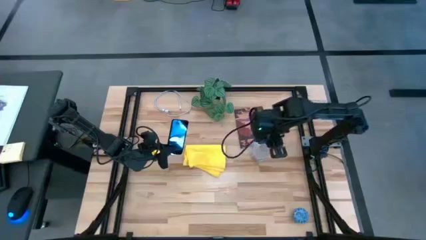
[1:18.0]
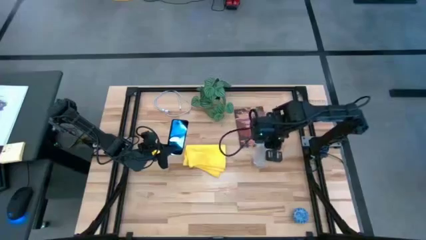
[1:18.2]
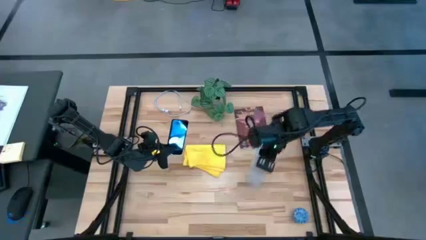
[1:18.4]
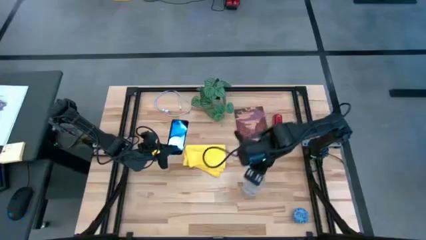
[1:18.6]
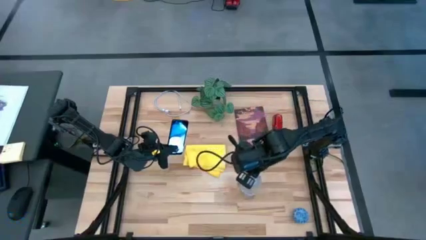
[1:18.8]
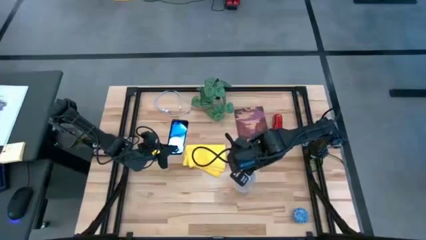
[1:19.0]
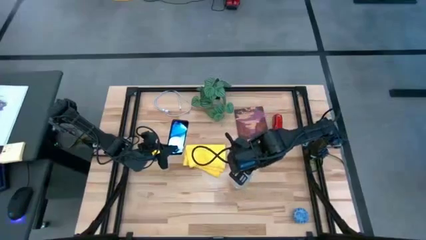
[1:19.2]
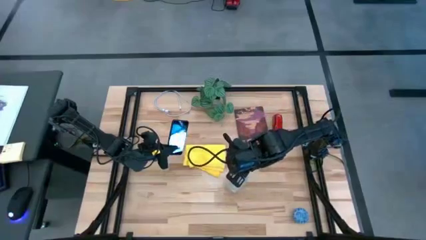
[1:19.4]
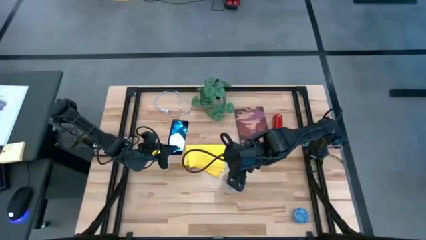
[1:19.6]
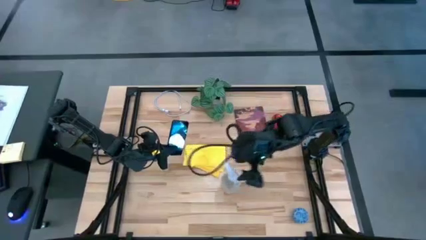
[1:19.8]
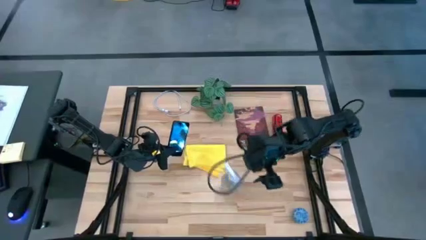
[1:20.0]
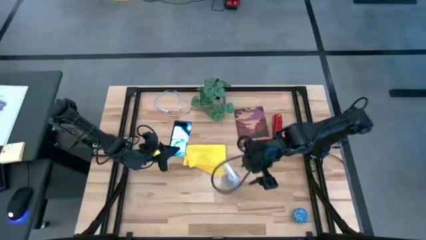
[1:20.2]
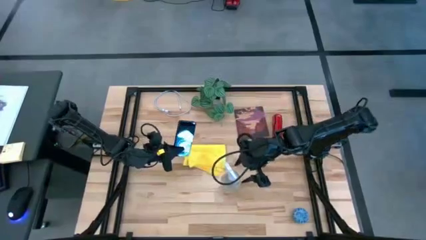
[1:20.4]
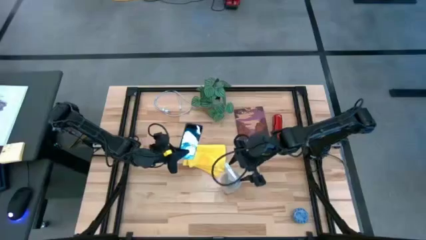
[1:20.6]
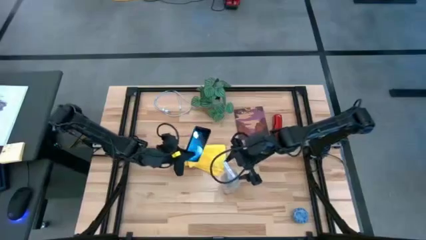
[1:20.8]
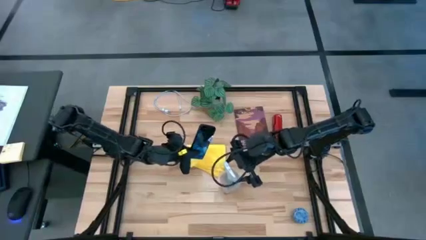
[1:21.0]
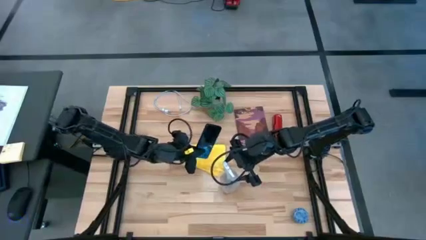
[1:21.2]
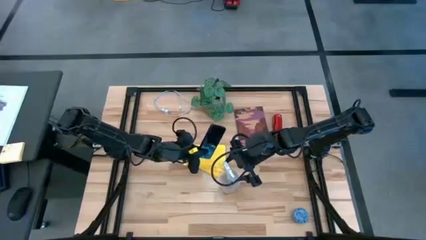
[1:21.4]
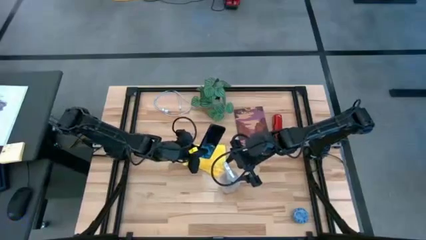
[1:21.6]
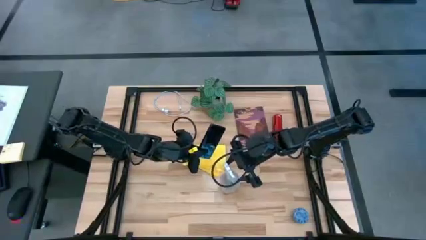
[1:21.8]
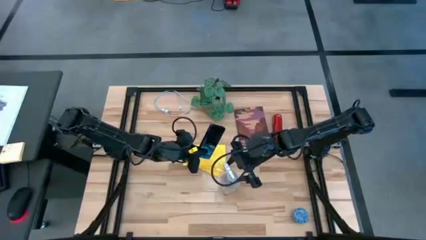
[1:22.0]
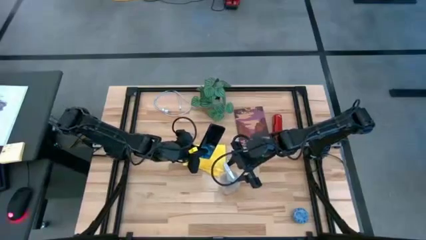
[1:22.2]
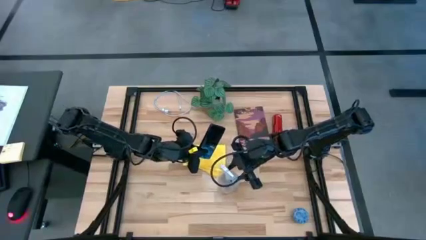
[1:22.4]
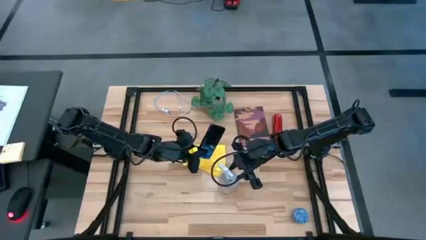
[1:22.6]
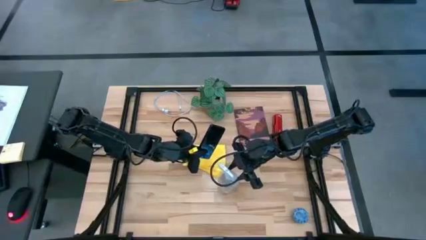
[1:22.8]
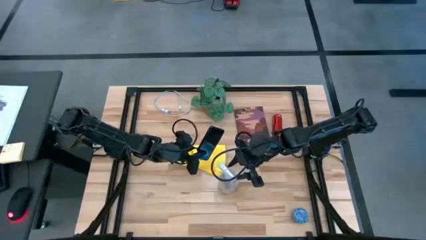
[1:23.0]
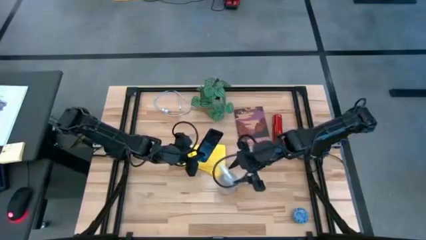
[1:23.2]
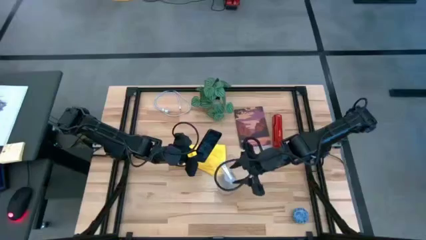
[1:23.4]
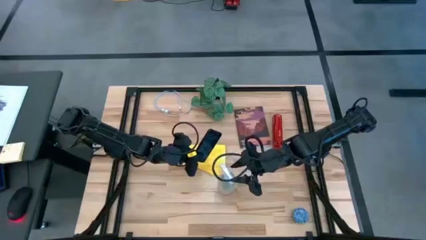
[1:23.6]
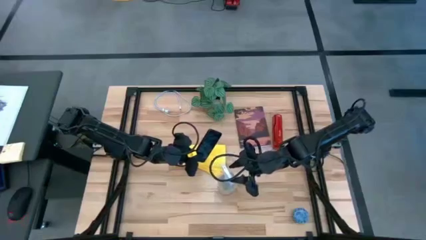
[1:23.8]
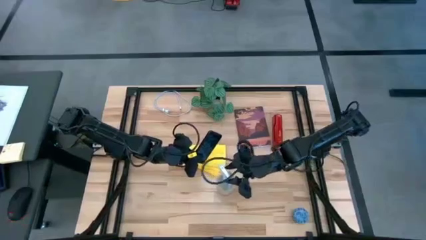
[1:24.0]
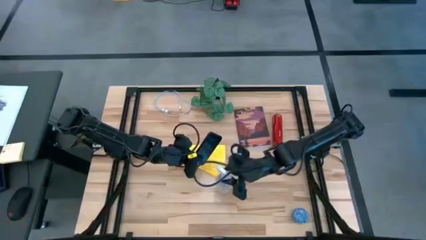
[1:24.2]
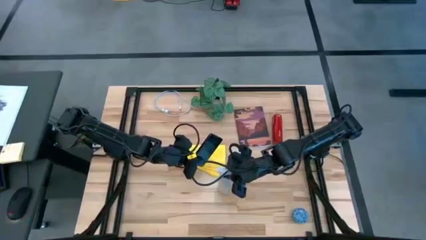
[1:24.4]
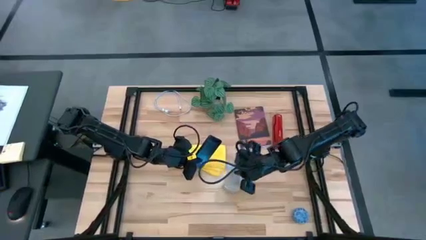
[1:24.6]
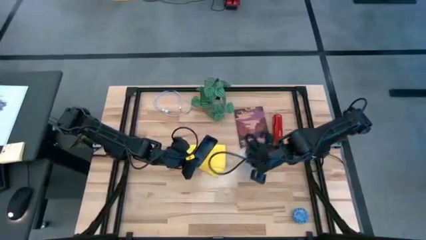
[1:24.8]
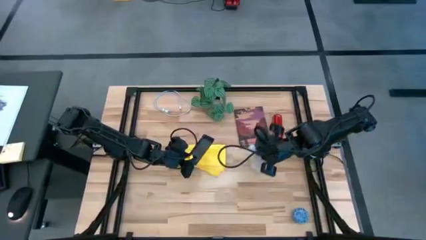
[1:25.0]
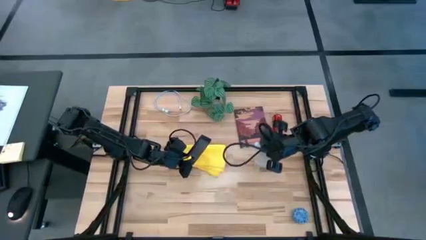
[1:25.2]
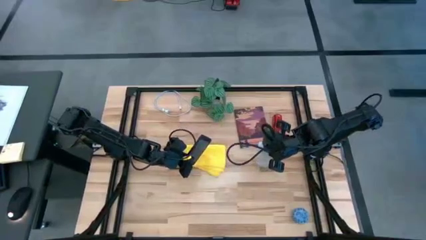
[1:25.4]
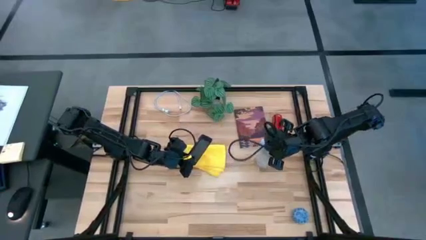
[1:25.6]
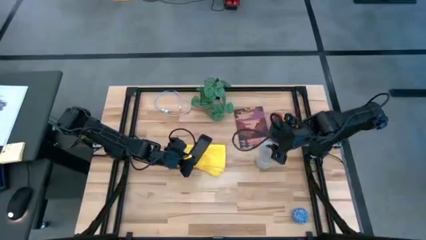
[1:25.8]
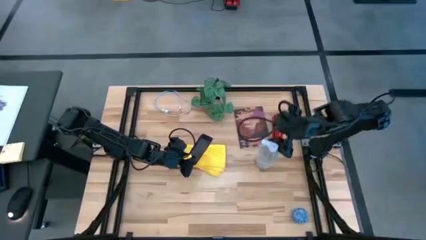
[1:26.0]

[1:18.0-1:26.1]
Task: Apply microfiber cloth
Spray the front of the black cellphone with the transparent spray bottle

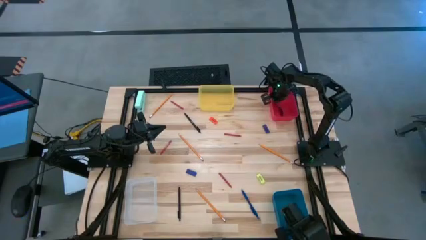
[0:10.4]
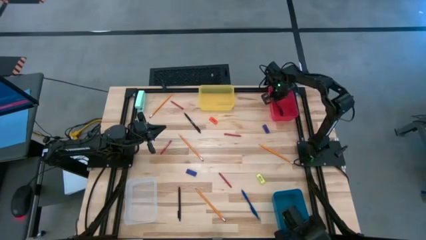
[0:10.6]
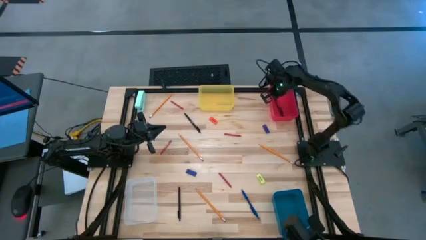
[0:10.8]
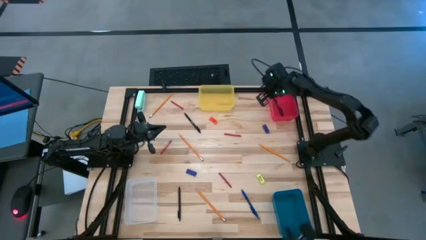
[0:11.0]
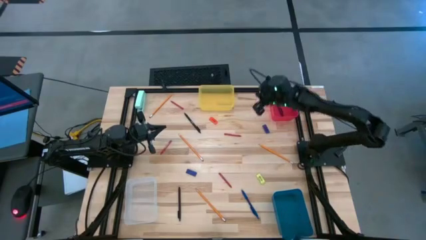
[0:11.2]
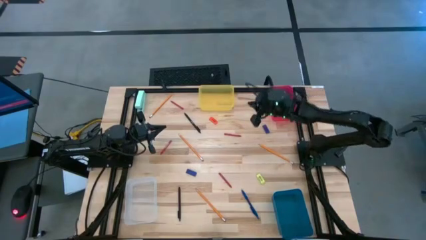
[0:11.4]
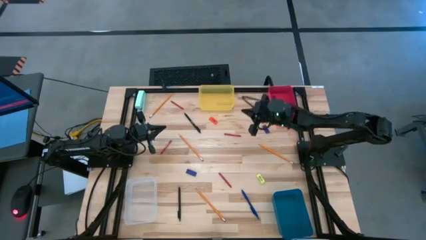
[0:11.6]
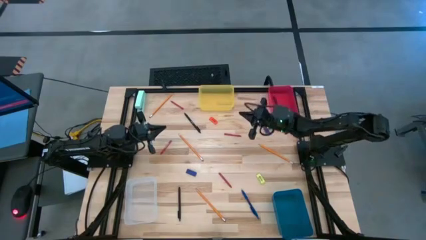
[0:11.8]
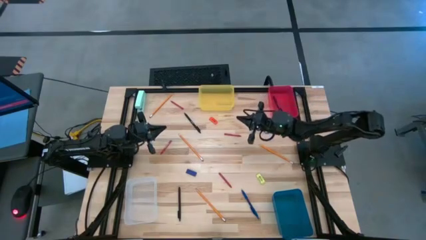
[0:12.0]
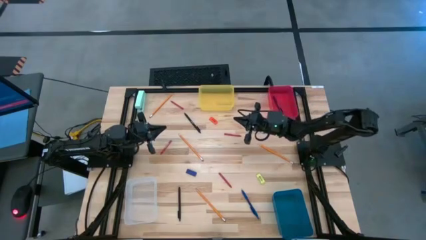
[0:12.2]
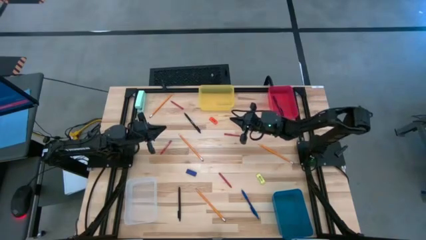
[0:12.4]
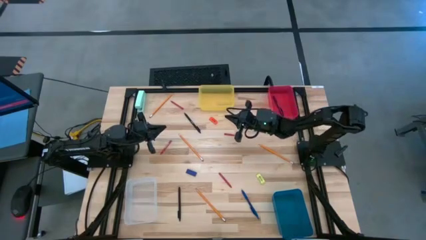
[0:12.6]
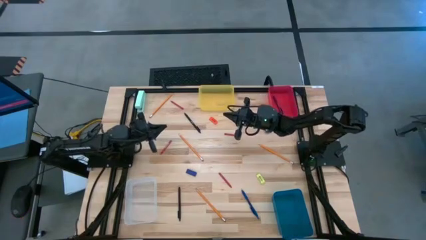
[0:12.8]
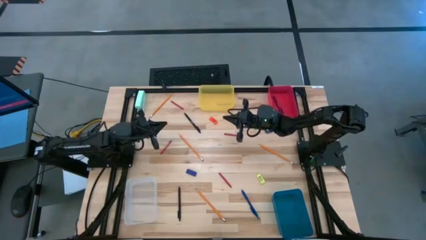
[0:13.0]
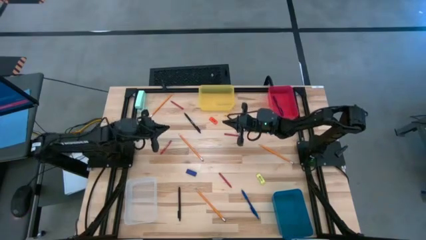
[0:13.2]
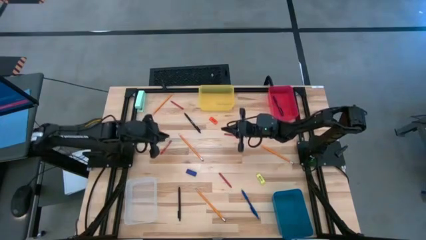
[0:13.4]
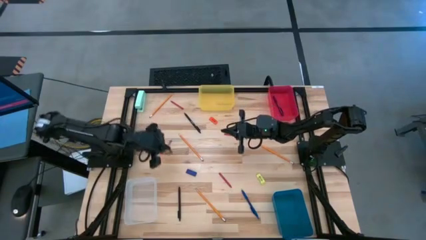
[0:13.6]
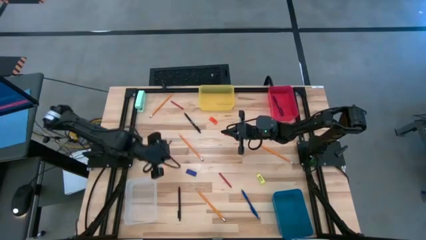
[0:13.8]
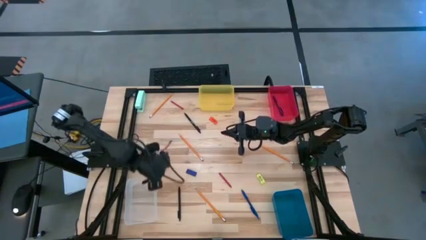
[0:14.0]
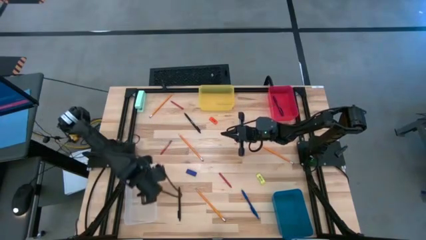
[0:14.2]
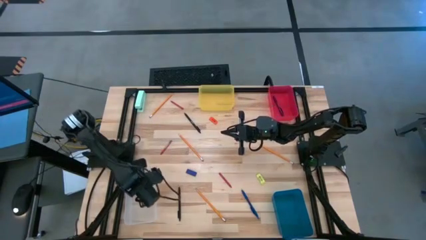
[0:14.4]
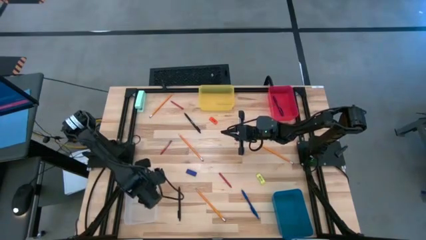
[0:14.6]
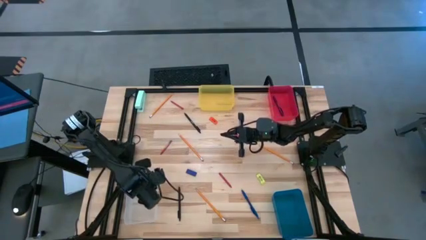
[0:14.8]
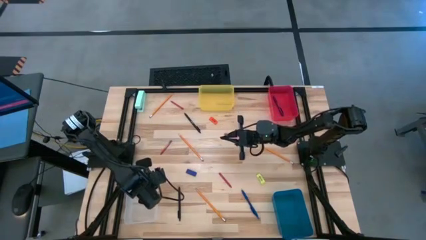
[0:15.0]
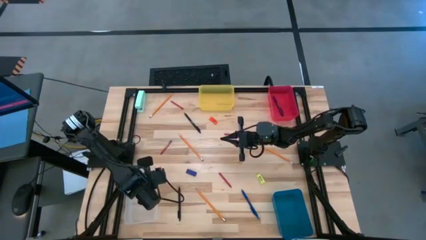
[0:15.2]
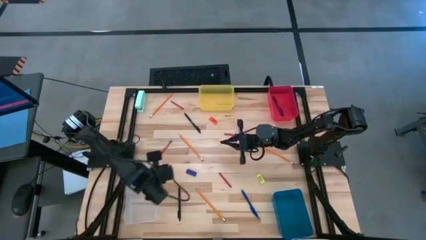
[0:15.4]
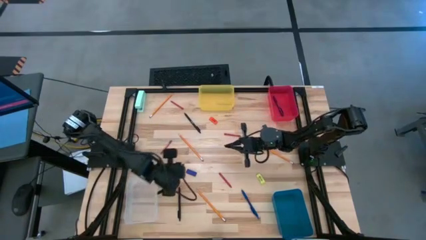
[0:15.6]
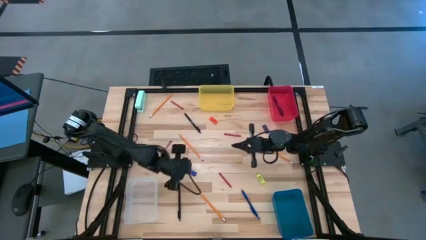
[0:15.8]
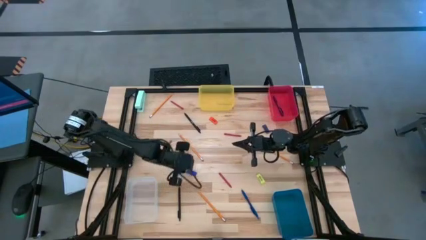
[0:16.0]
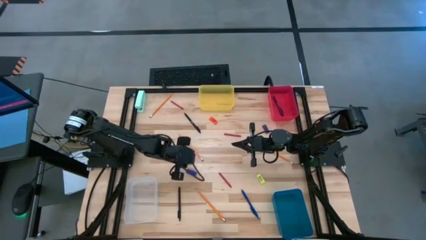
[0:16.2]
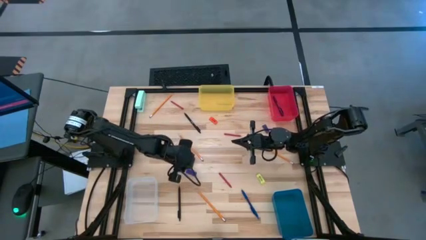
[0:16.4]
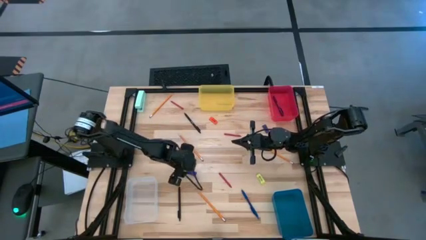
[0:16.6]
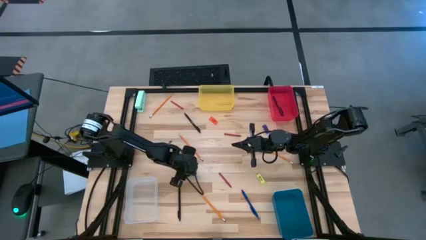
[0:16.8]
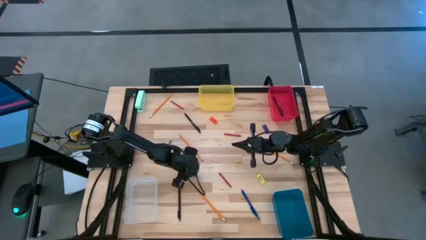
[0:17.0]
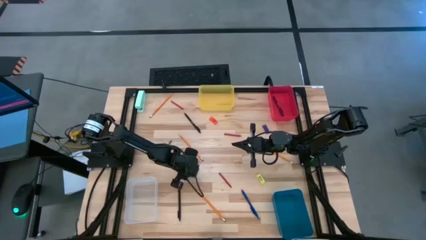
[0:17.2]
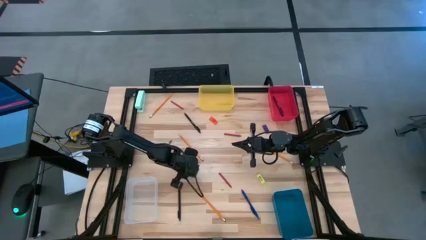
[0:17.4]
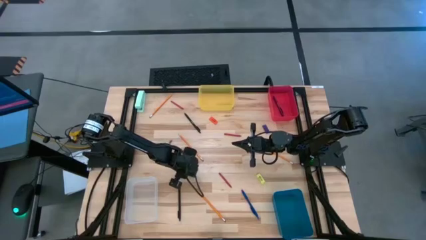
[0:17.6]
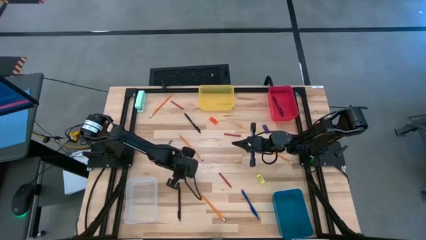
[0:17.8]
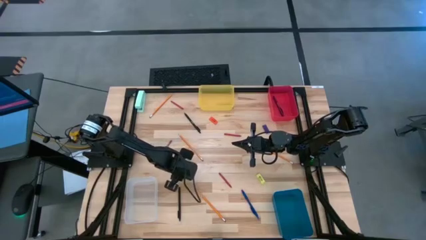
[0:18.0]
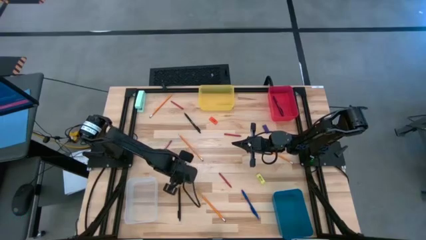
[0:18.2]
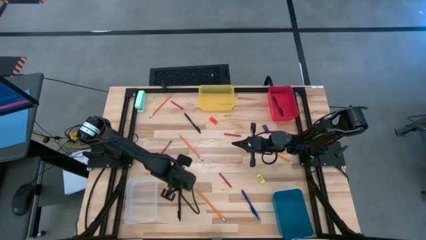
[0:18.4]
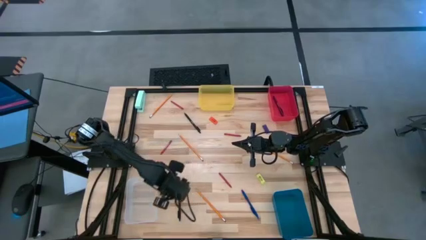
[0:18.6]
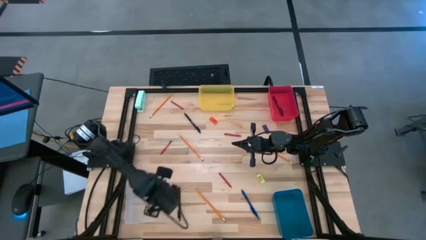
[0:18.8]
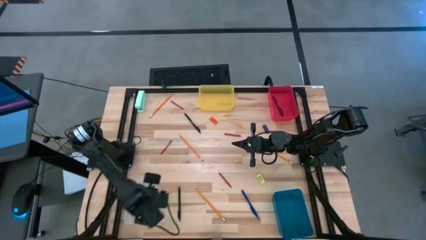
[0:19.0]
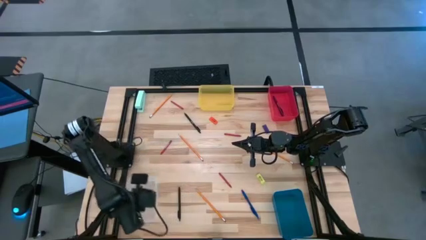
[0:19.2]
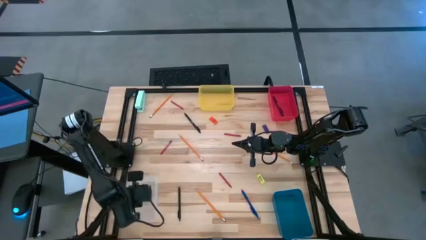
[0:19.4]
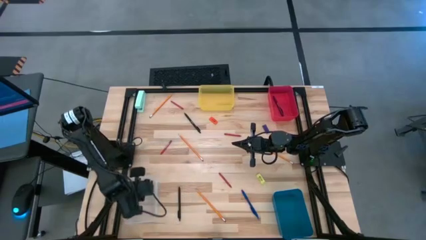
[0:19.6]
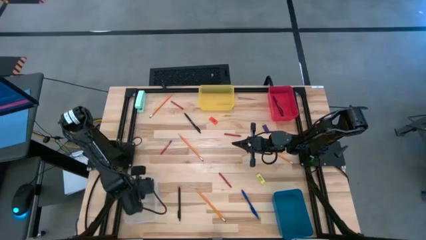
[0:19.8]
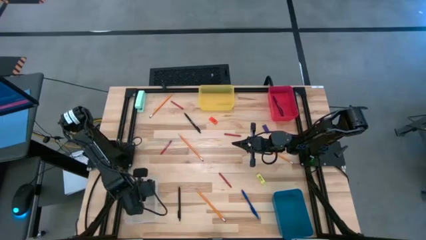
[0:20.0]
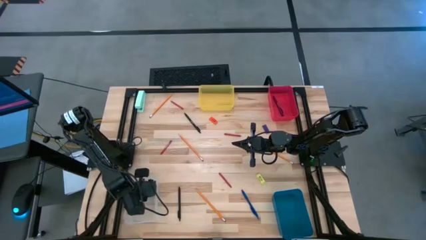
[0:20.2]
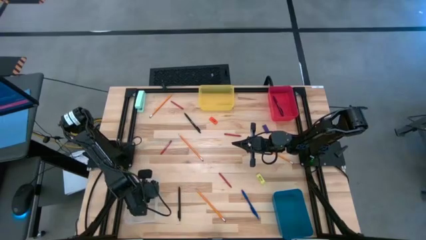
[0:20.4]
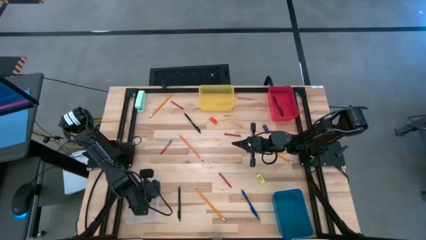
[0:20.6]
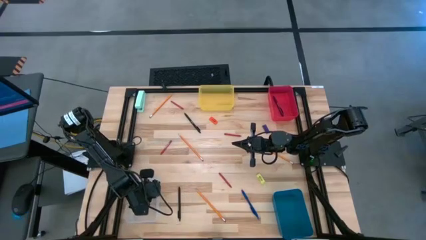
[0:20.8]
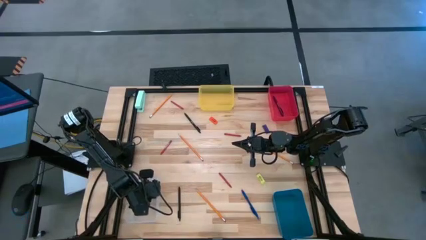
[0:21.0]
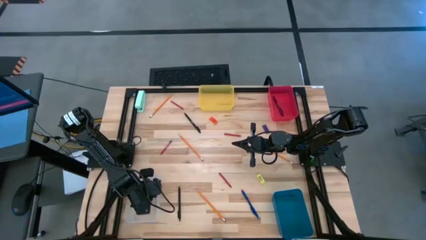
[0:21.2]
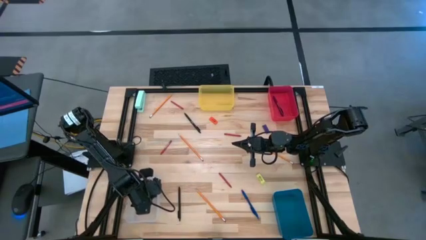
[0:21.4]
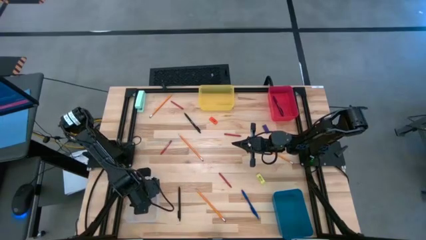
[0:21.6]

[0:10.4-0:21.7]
Task: Sort crayons/erasers/pens/pencils in bins
Put the blue eraser into the transparent bin
